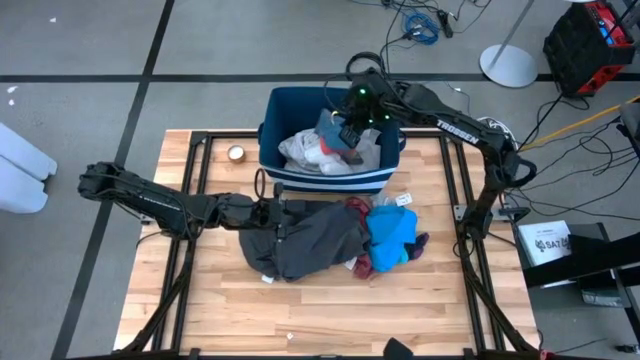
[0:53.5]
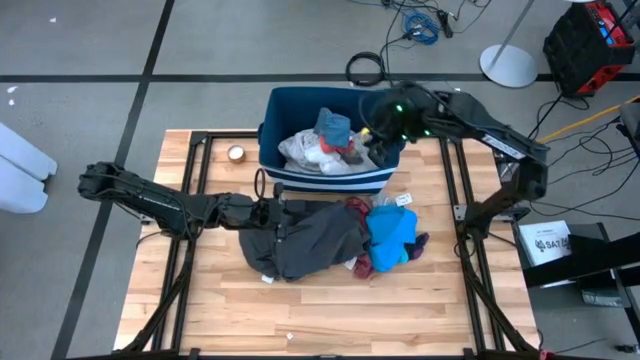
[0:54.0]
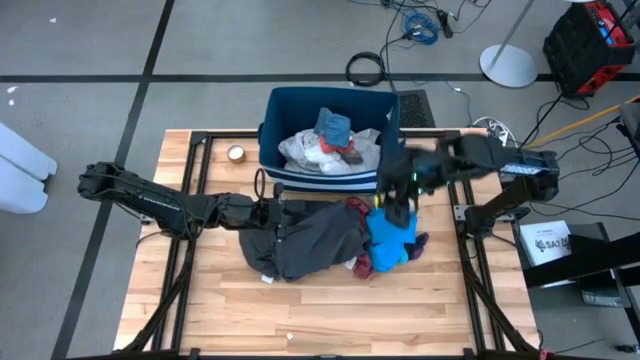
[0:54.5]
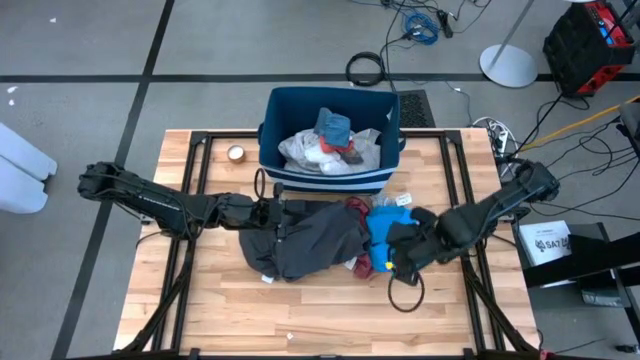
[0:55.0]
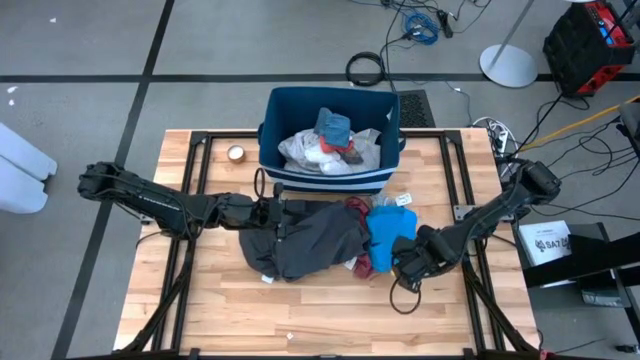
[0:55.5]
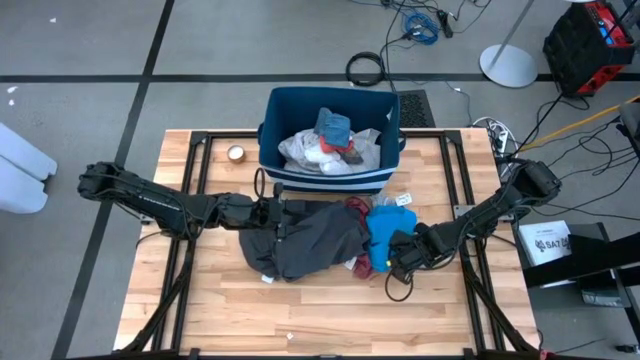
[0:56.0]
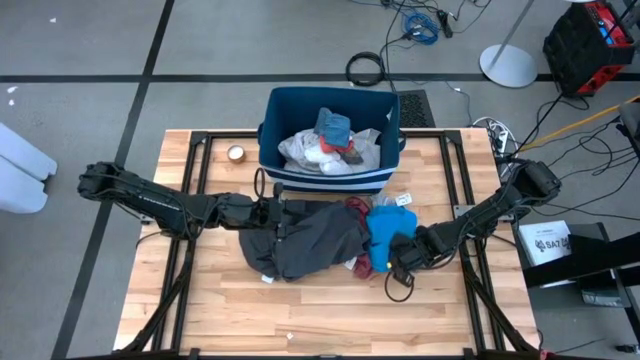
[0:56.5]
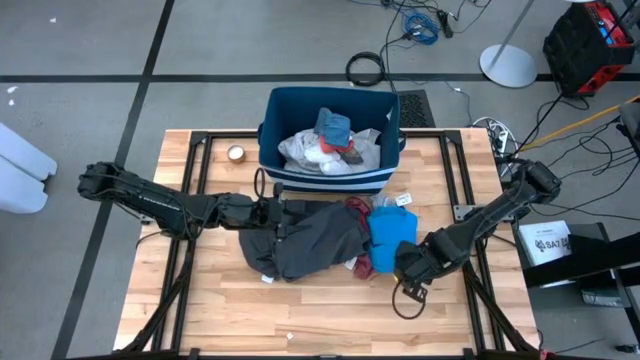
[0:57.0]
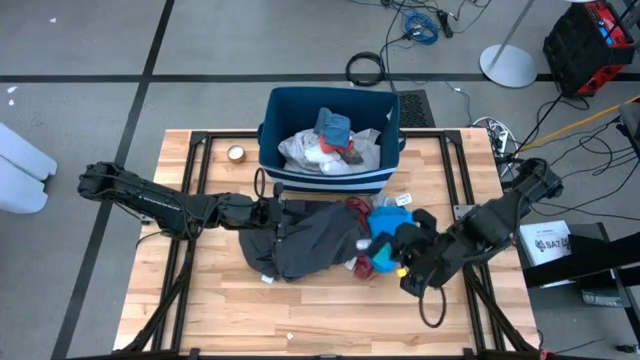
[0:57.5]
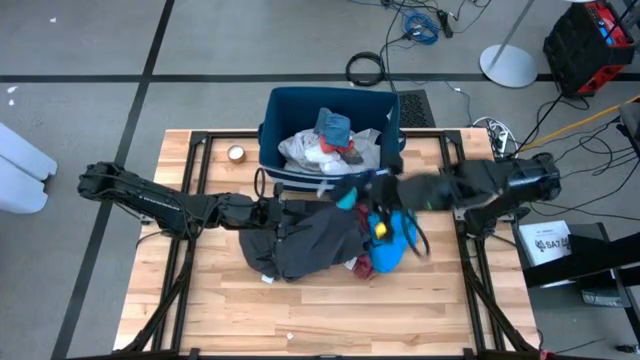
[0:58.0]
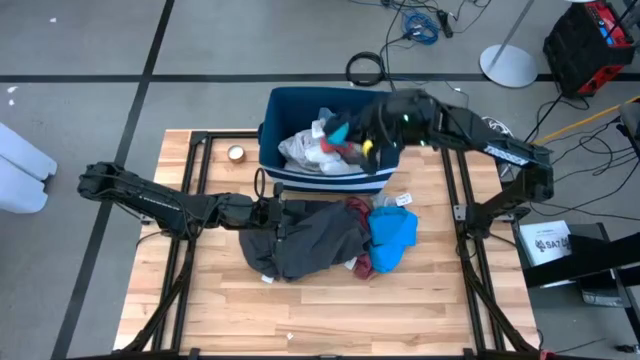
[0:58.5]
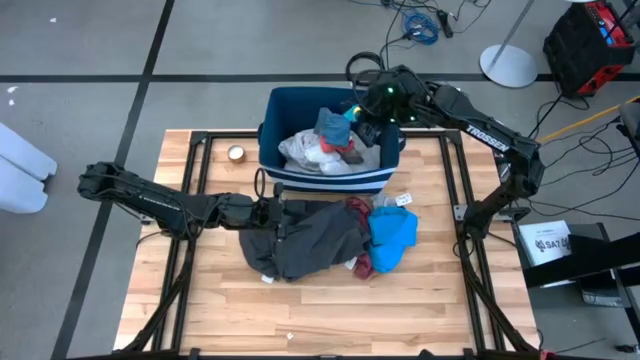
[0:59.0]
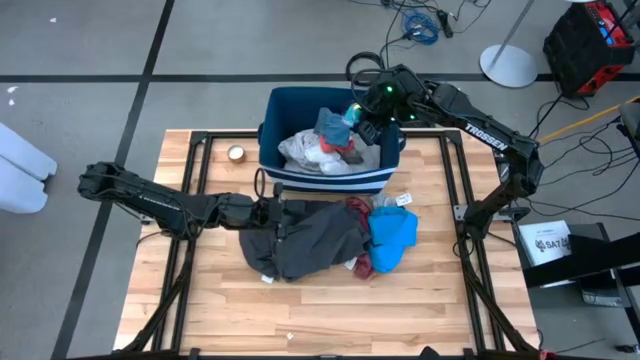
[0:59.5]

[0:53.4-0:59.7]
Task: Sort clothes
Put the black sock into the blue bin

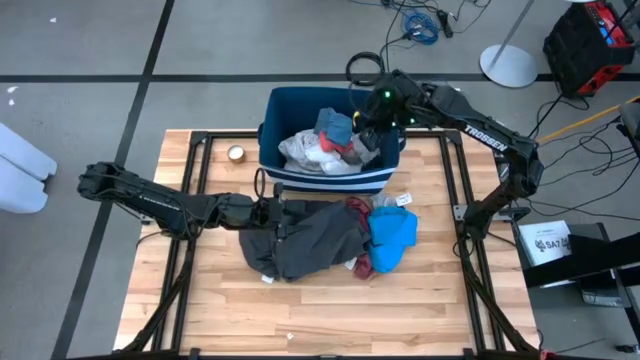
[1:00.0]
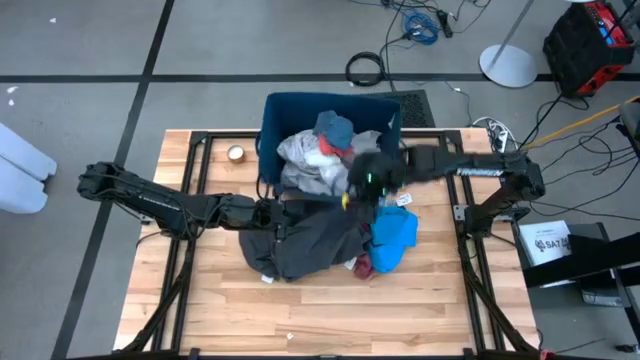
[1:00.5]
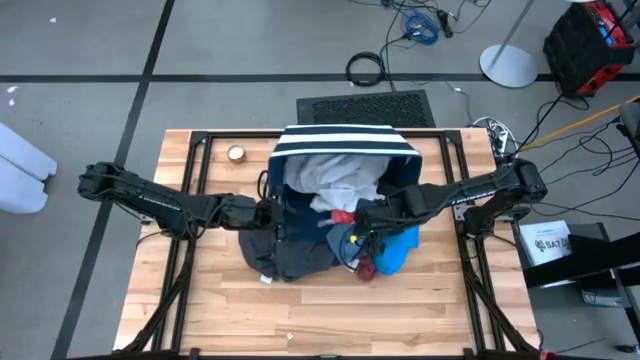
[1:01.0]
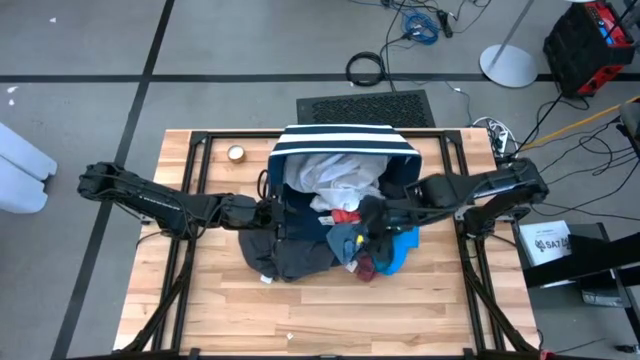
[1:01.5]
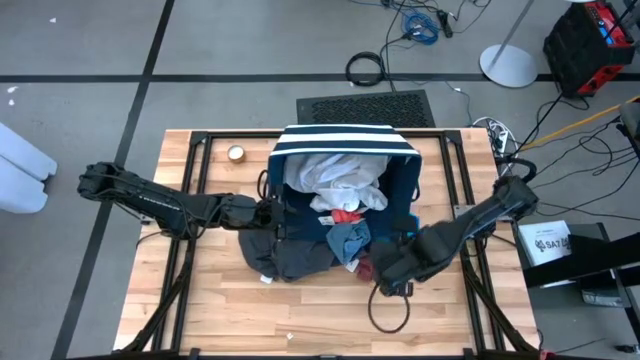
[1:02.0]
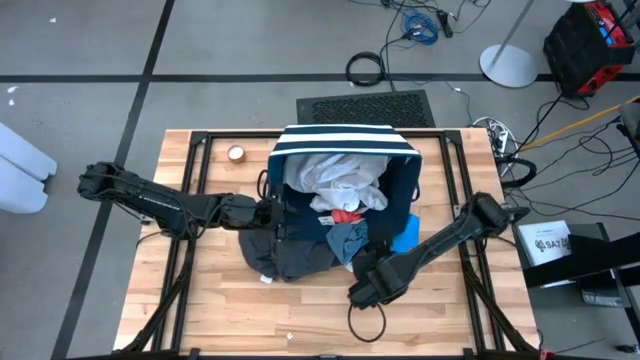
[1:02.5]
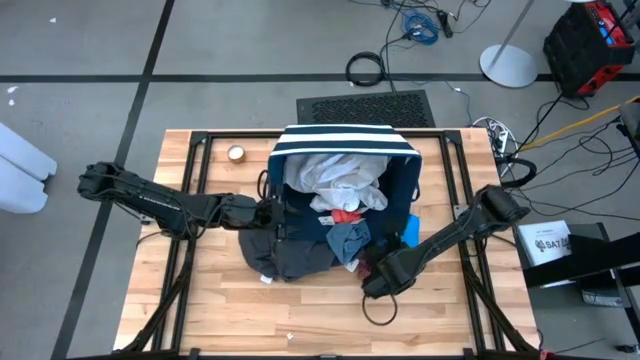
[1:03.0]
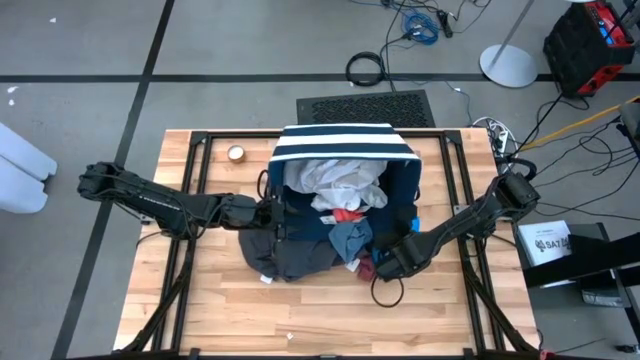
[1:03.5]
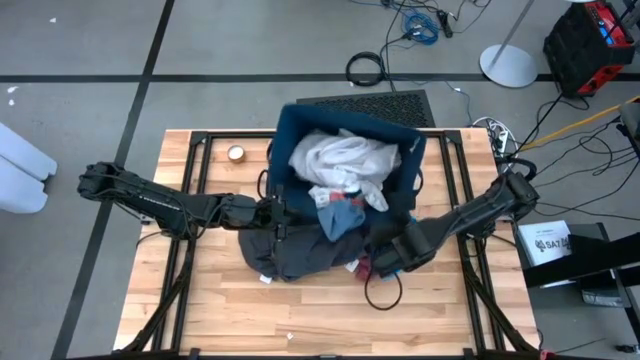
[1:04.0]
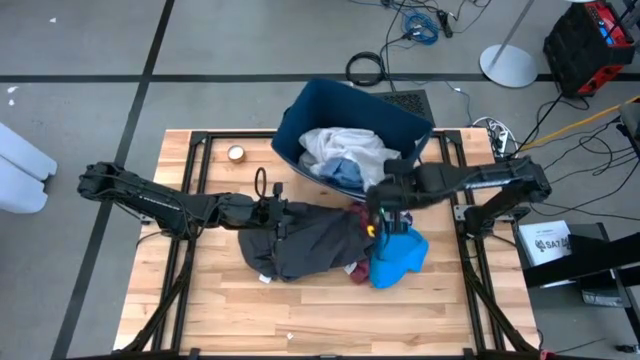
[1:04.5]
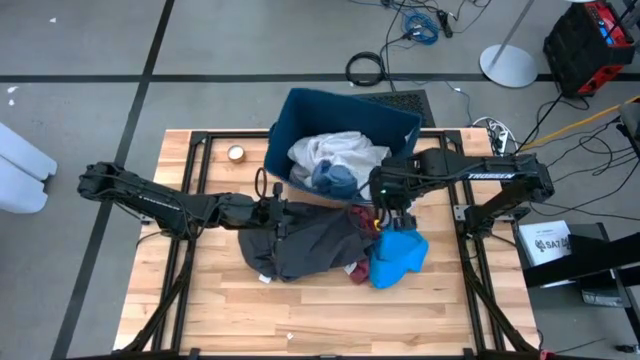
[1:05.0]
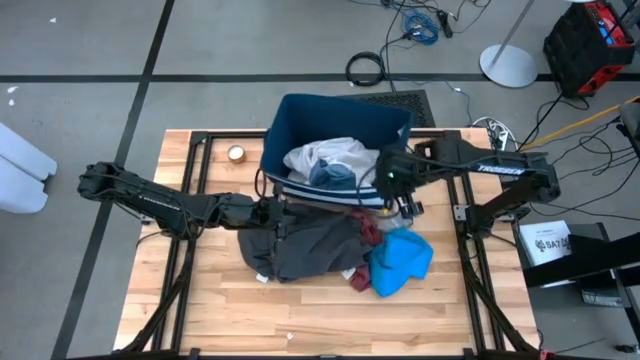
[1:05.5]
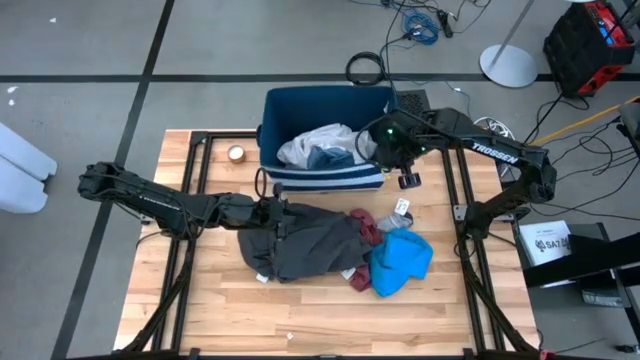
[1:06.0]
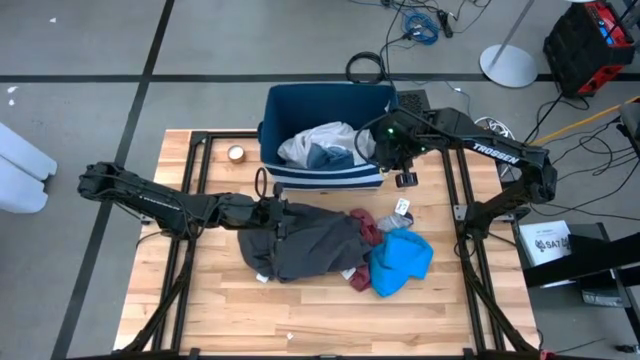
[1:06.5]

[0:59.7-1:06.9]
Adjust the blue bin

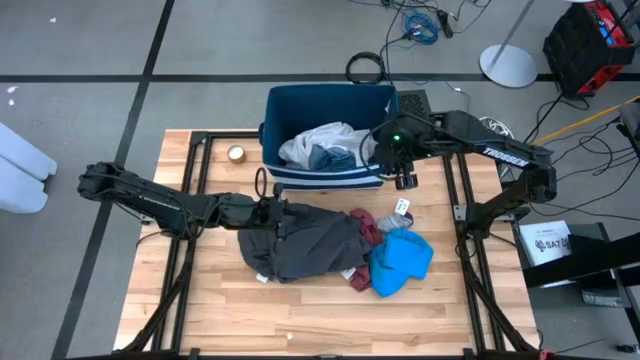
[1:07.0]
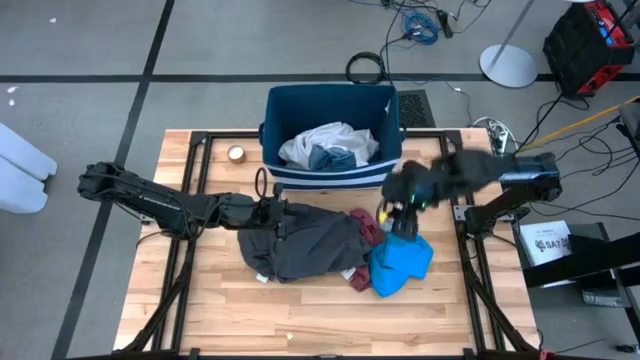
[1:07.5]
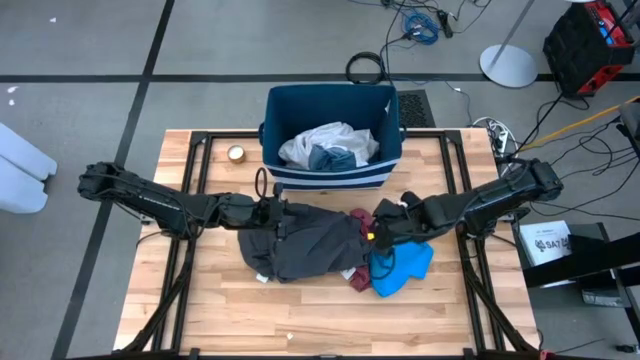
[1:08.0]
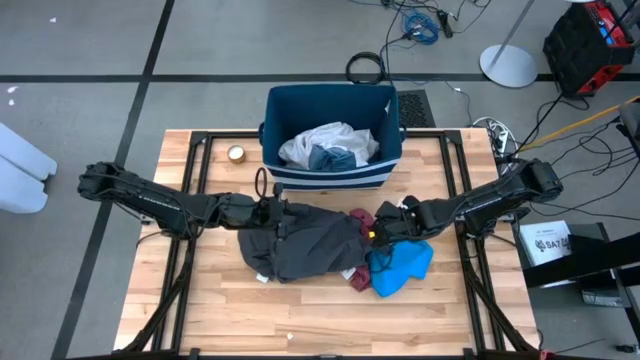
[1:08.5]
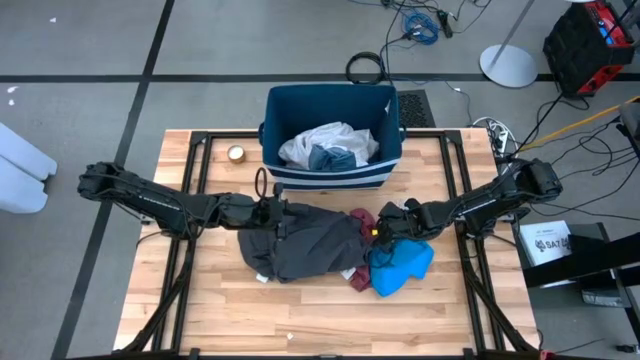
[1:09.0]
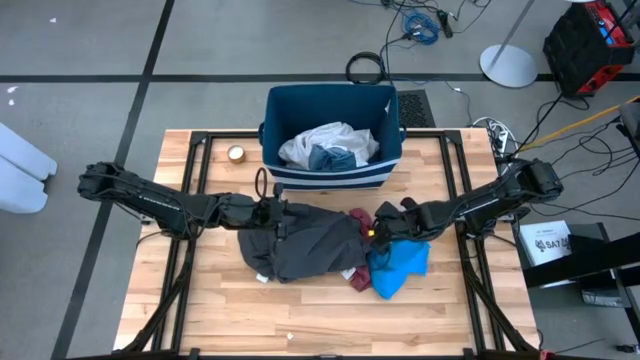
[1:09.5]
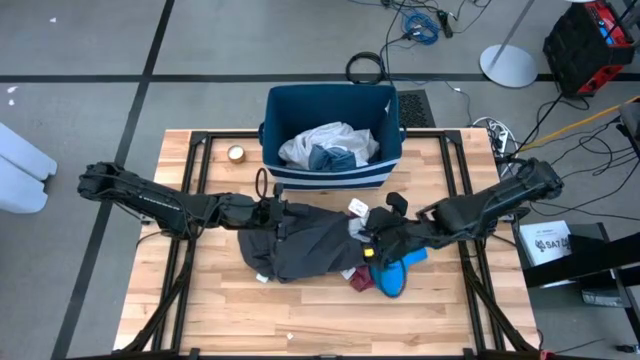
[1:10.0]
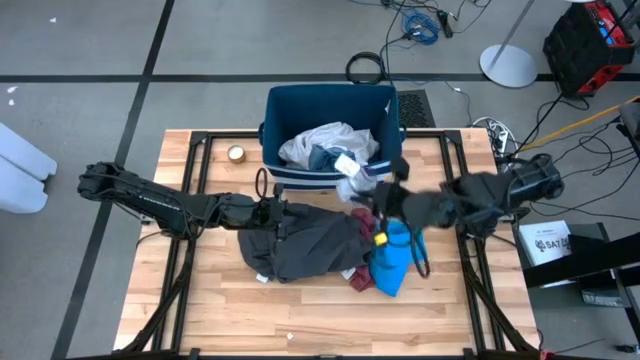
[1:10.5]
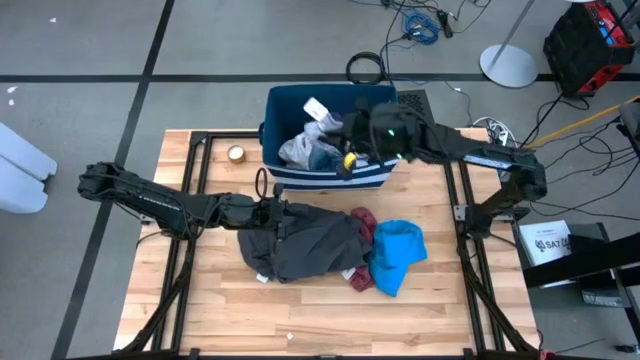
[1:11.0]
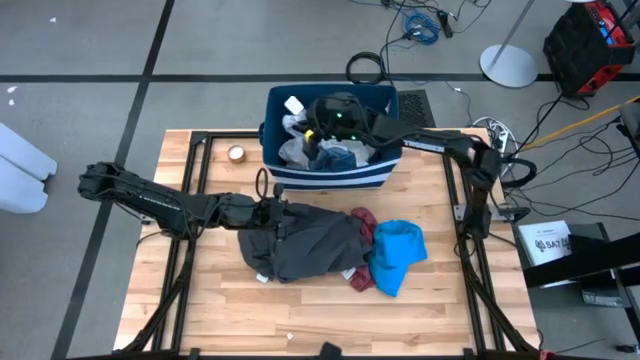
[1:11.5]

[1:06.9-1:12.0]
Put the gray sock into the blue bin

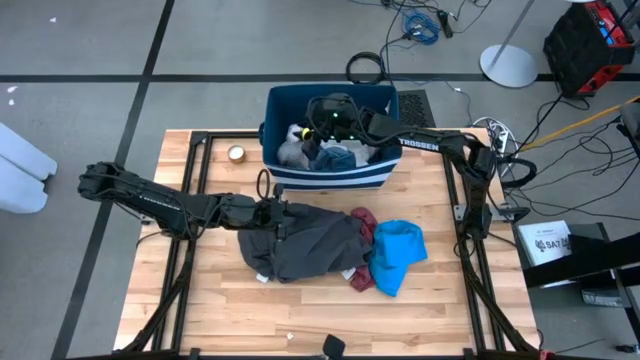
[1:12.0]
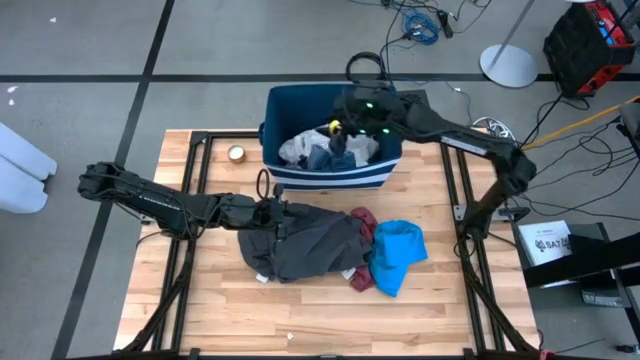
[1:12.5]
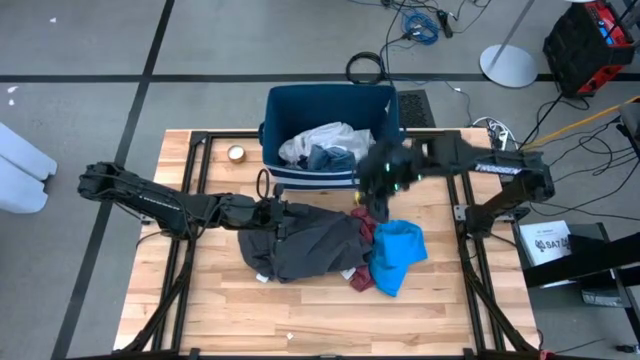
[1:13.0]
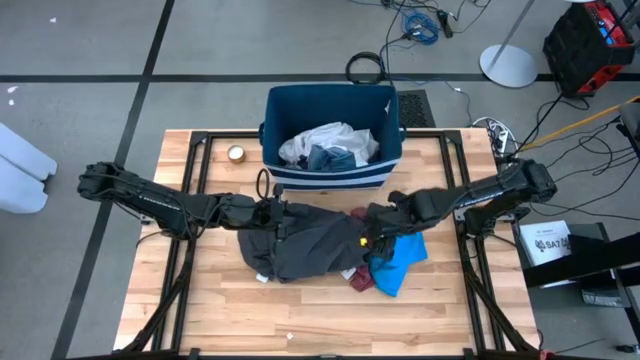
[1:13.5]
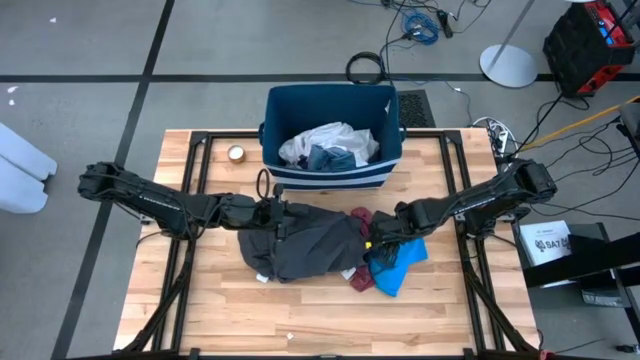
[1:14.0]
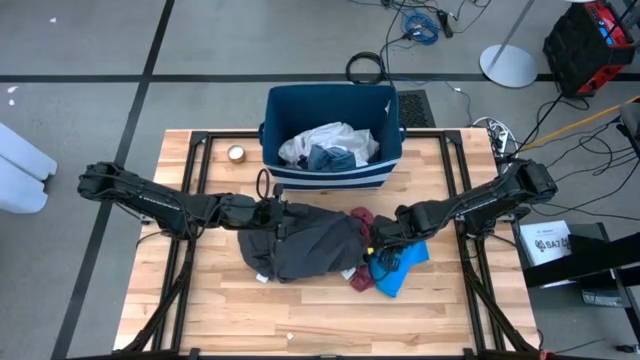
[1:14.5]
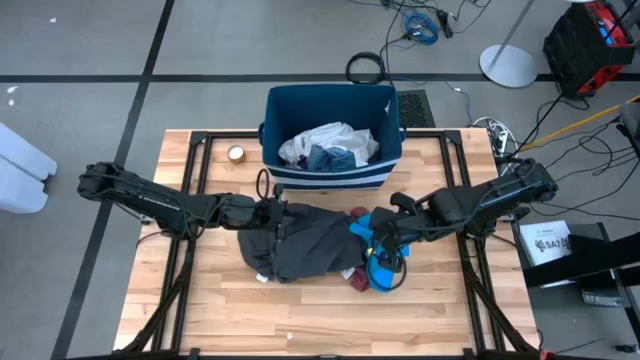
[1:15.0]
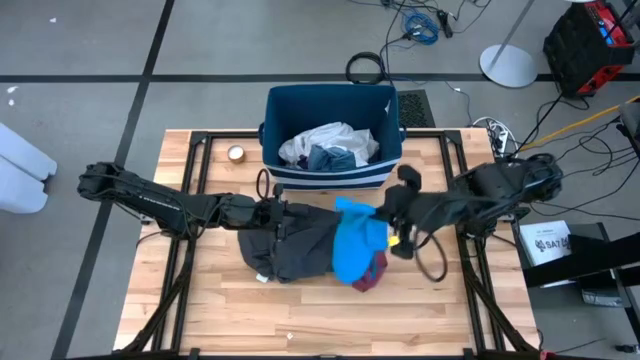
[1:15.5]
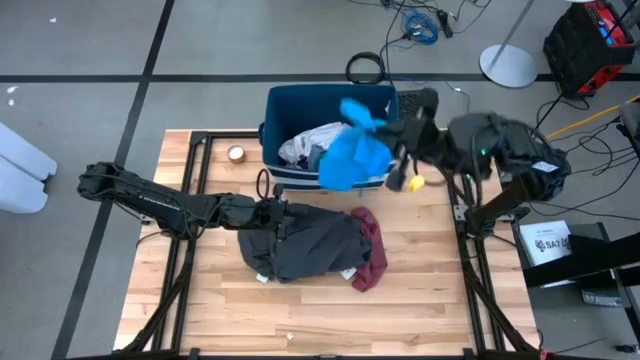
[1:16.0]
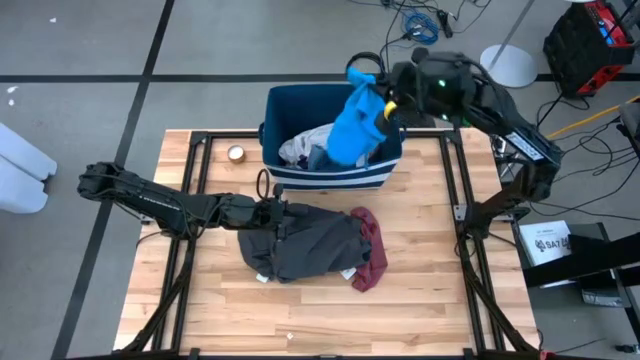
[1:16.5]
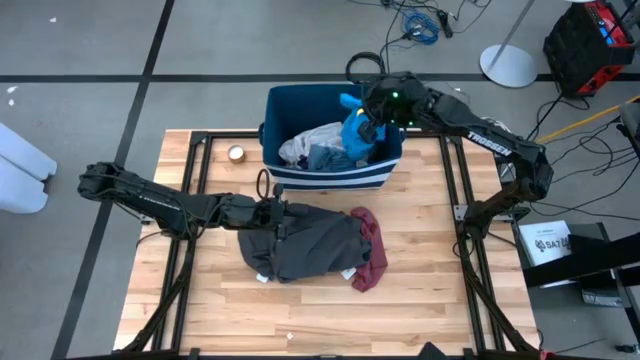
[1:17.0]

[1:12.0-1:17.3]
Put the blue underwear into the blue bin
